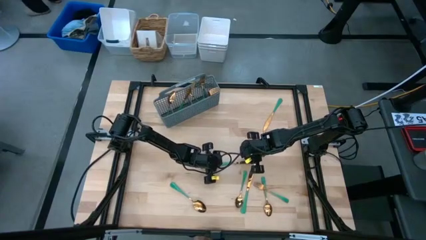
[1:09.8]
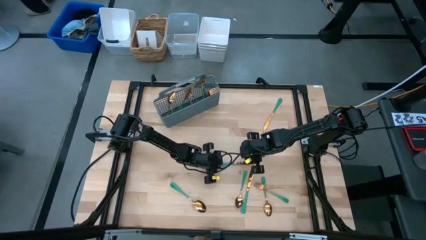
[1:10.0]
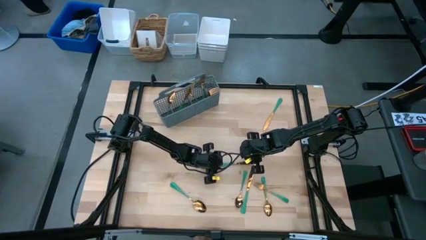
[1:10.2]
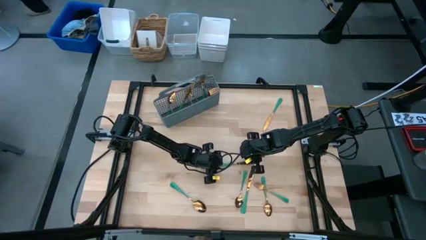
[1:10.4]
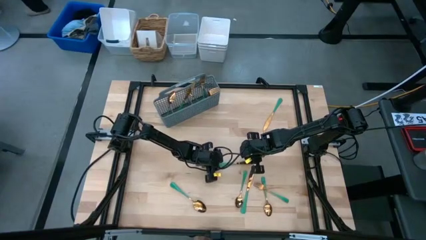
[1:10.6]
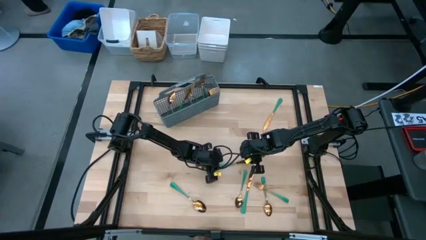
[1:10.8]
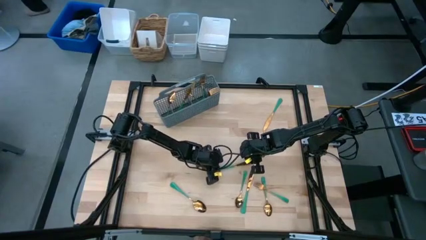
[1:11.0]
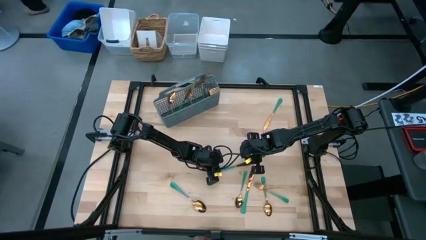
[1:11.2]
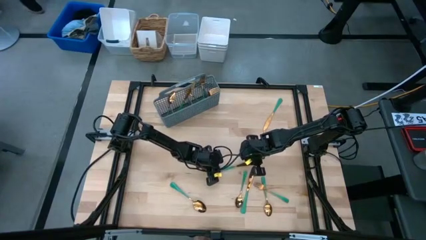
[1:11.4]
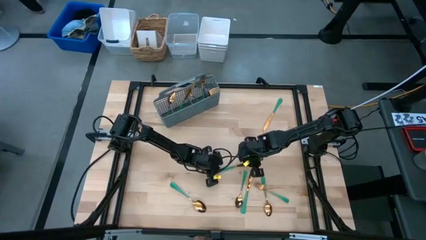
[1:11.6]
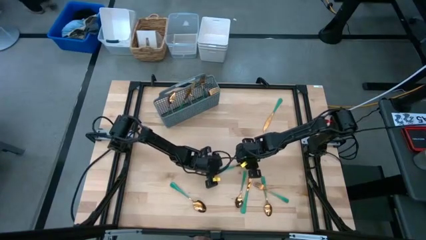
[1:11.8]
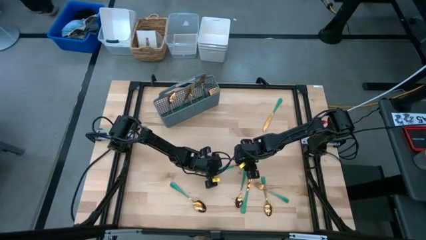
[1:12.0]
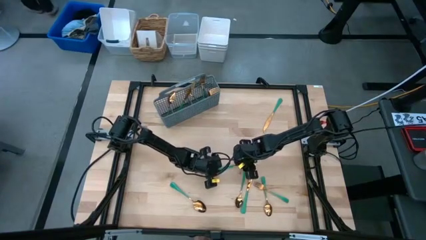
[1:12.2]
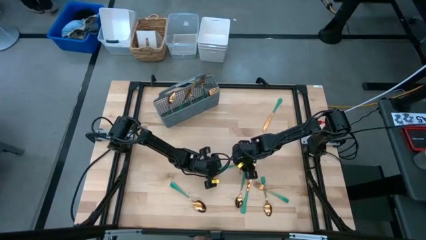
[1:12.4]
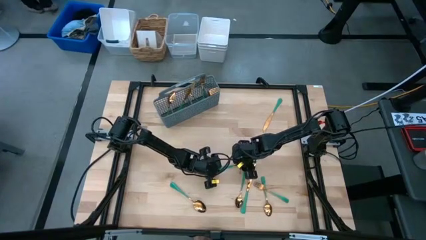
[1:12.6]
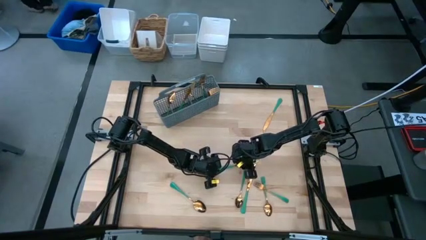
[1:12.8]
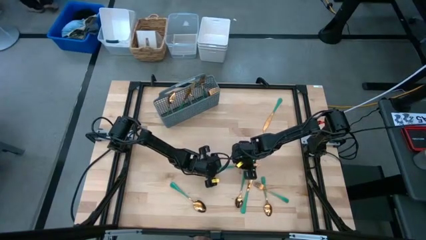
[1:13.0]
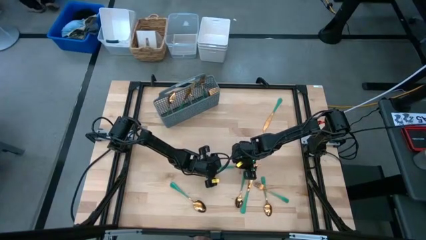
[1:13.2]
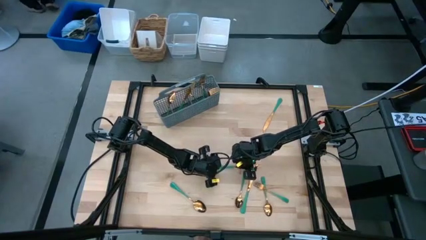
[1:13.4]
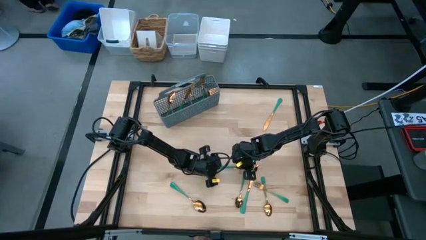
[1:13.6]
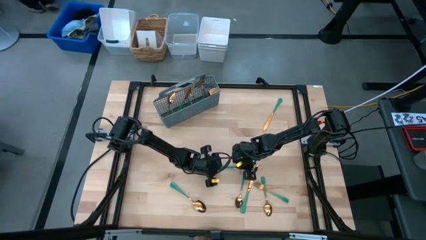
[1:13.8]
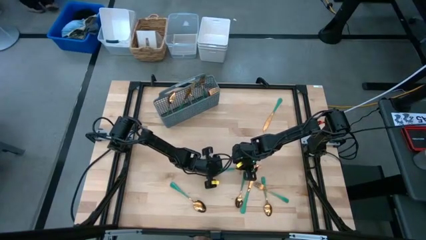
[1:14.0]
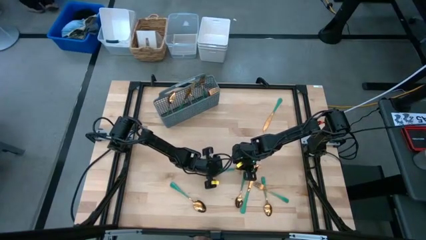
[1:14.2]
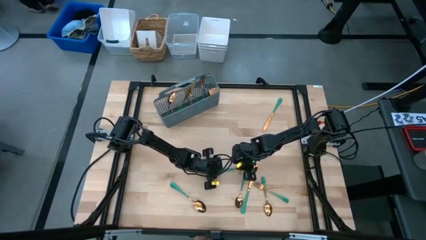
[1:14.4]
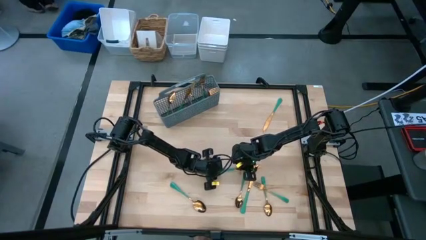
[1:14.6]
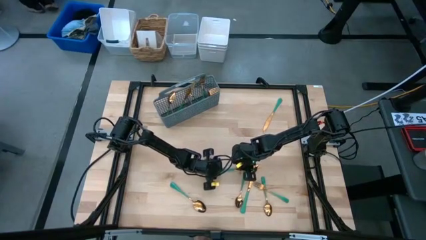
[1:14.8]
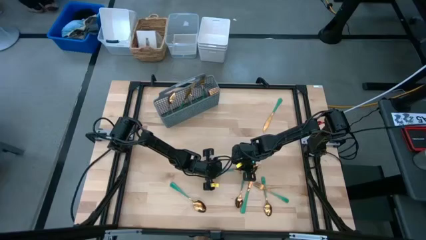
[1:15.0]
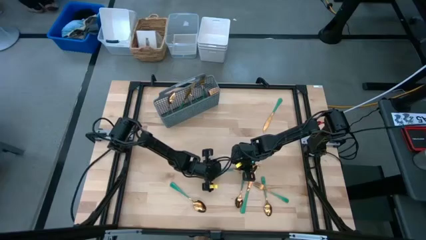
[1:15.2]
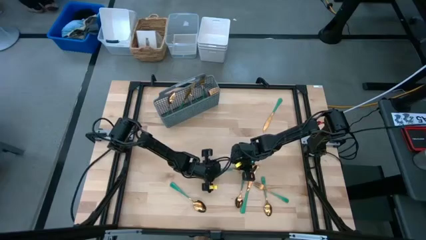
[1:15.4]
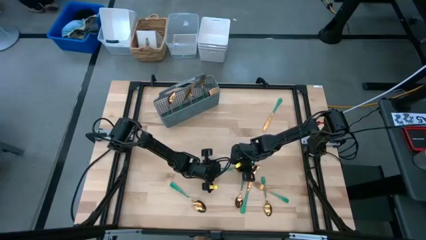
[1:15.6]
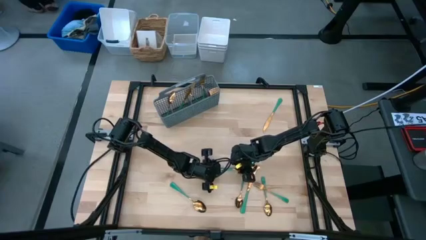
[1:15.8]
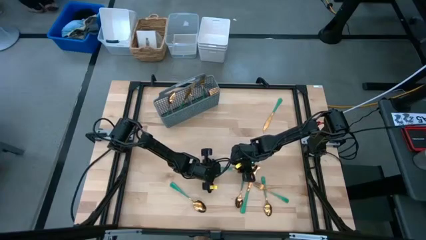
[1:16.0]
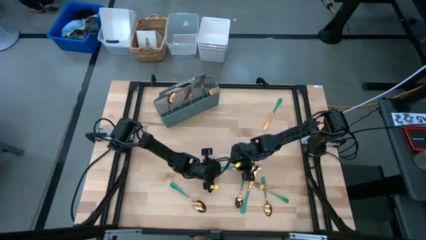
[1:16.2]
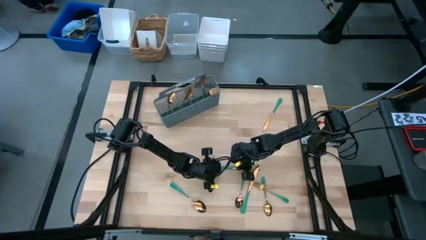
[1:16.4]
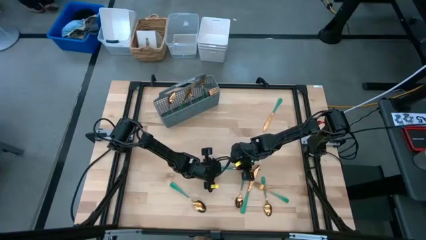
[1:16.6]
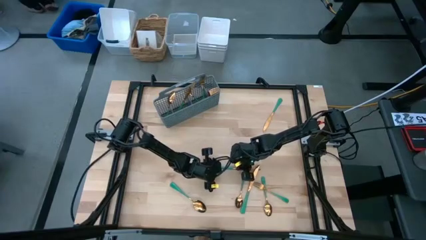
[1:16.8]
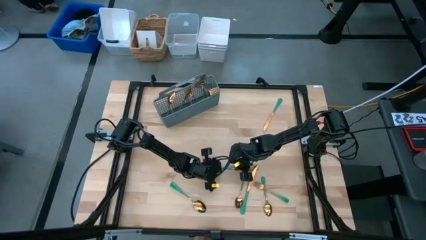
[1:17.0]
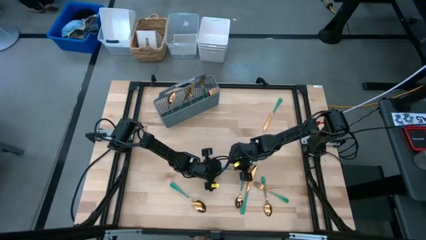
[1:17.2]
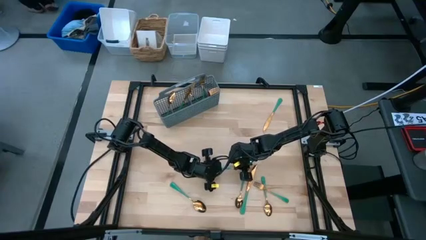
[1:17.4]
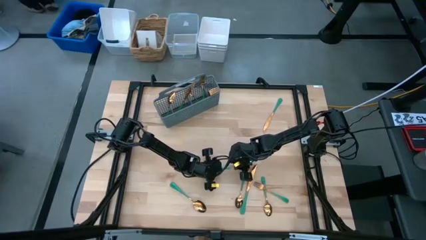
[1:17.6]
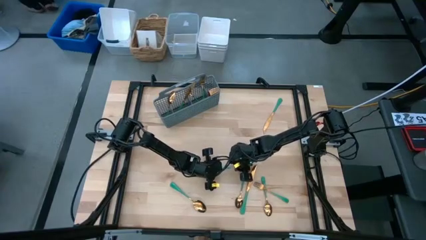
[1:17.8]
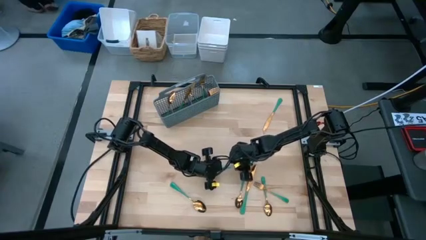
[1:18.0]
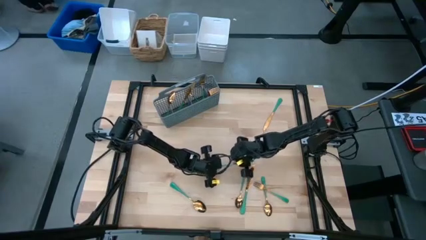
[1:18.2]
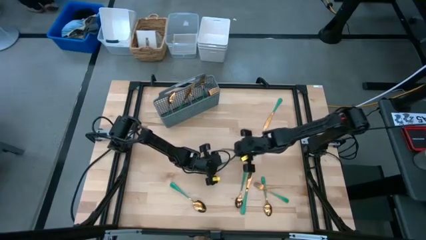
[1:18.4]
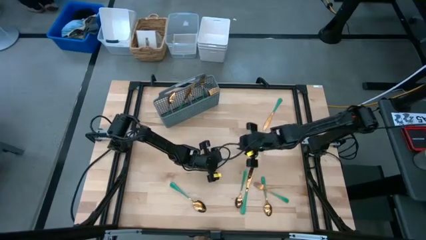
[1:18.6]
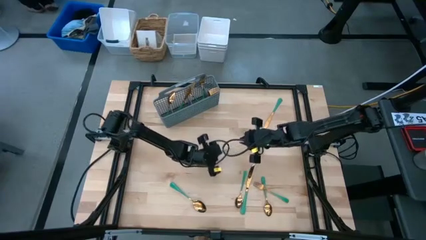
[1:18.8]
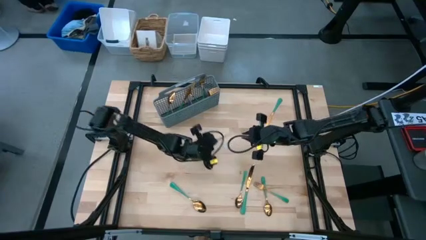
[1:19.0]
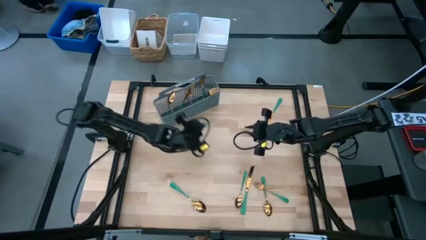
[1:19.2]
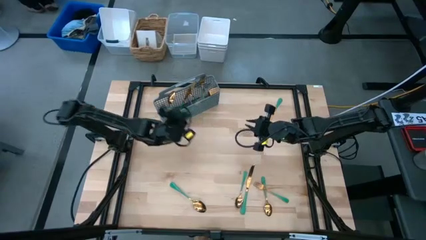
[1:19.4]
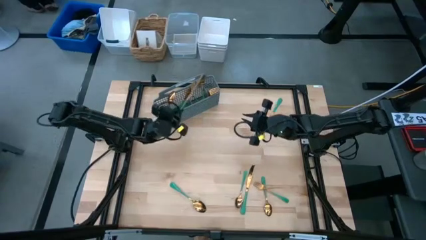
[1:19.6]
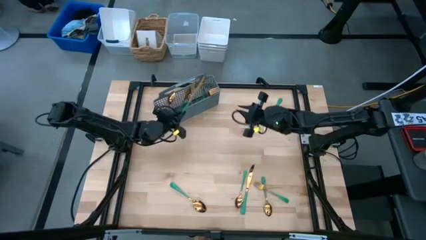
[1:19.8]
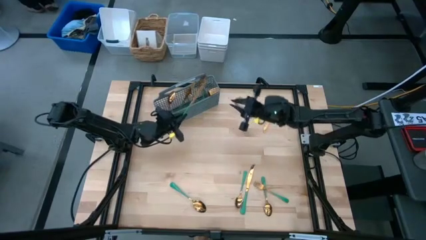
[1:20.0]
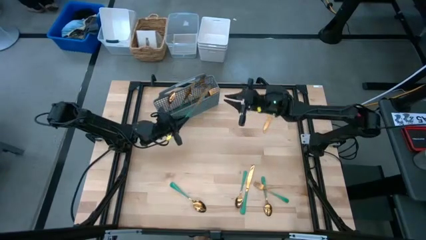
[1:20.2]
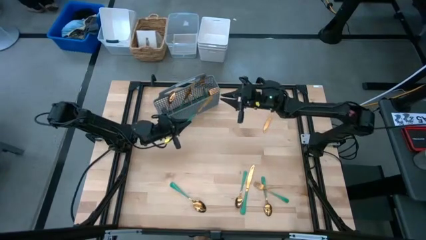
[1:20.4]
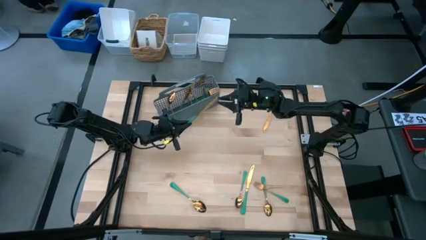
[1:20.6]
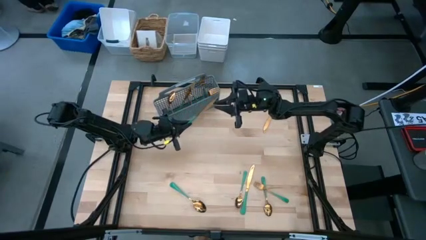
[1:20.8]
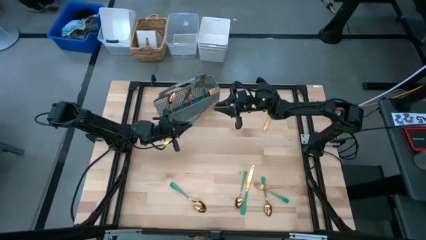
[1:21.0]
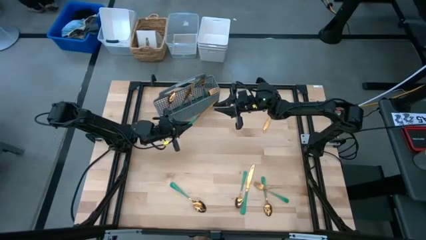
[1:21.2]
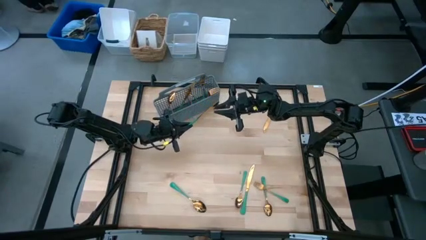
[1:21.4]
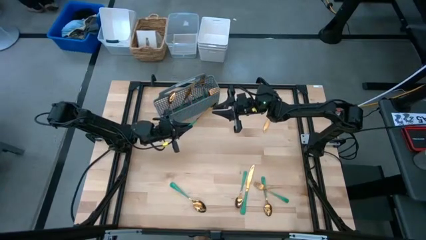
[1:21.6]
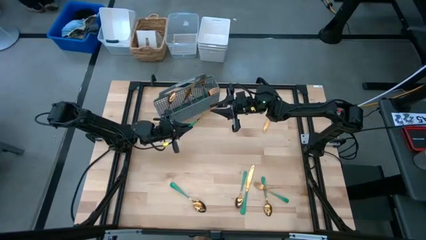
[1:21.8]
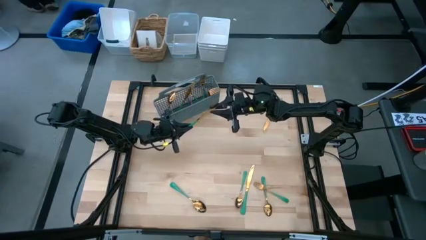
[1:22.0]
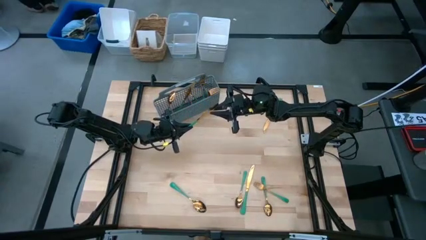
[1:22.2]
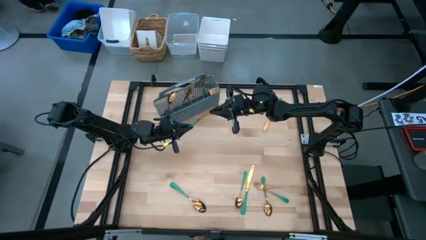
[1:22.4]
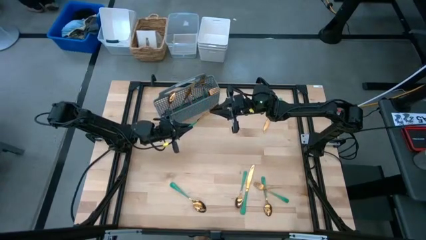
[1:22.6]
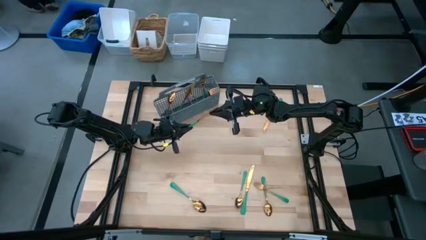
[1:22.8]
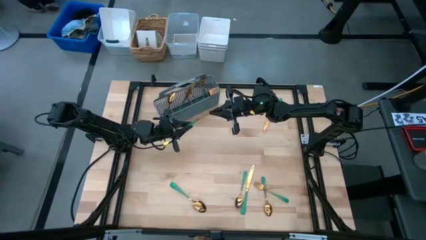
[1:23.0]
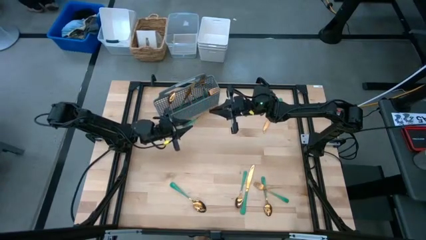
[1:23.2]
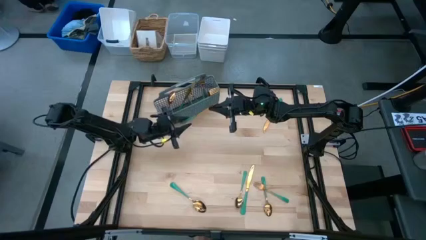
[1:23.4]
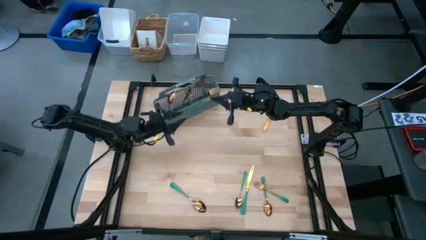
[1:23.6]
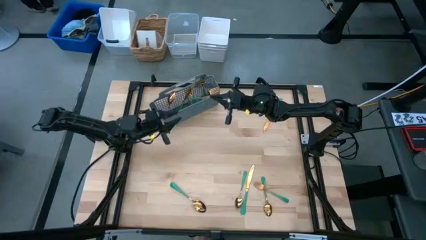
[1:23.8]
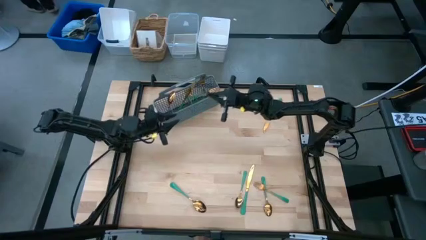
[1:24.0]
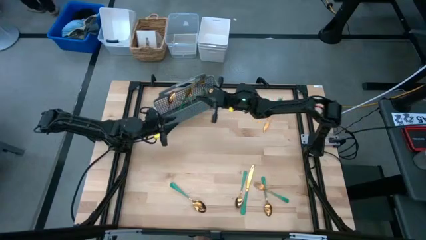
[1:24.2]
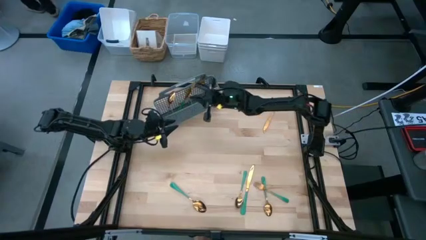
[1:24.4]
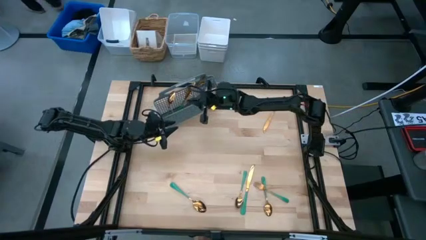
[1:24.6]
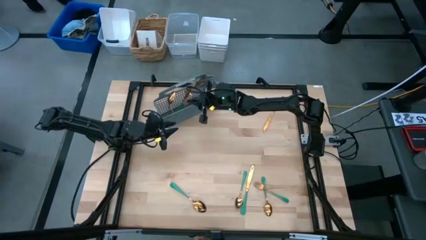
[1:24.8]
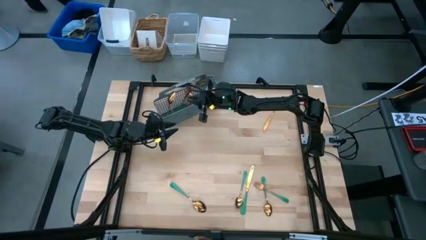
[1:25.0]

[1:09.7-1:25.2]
Task: Sort silverware
Put the knife into the middle left section of the silverware holder

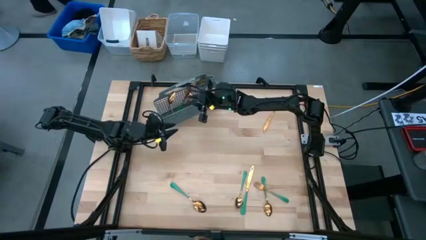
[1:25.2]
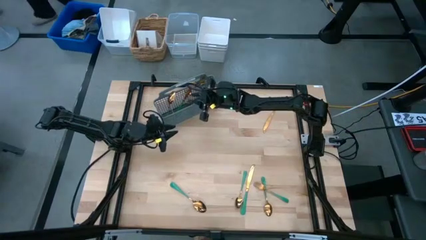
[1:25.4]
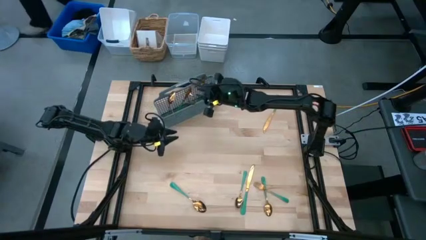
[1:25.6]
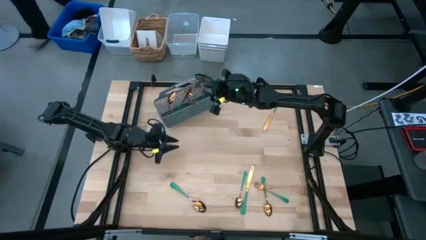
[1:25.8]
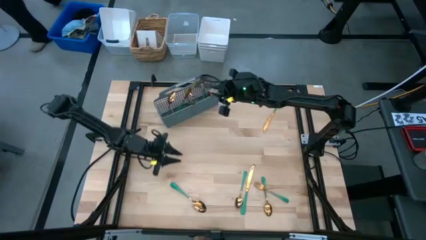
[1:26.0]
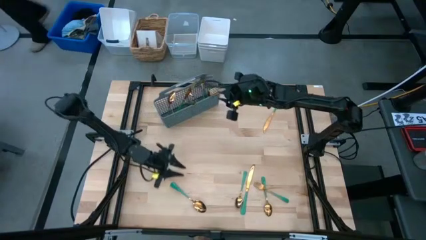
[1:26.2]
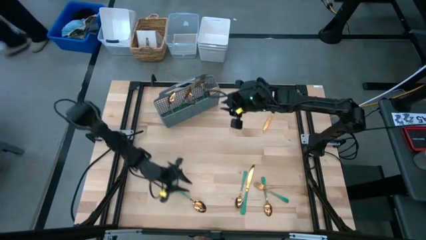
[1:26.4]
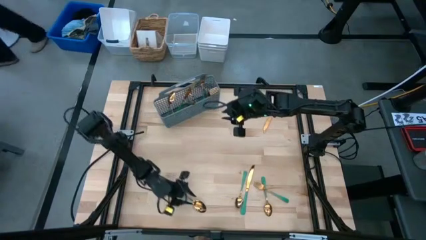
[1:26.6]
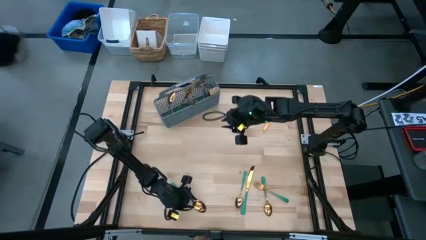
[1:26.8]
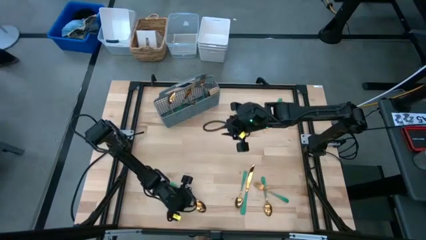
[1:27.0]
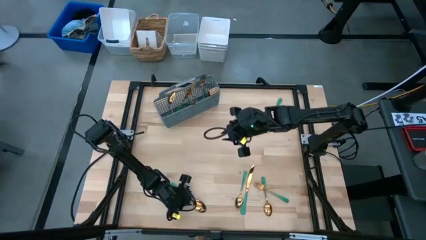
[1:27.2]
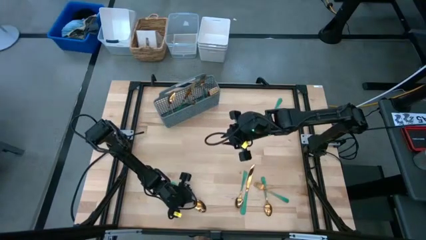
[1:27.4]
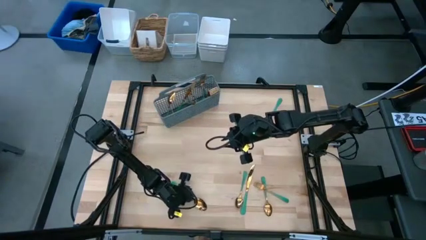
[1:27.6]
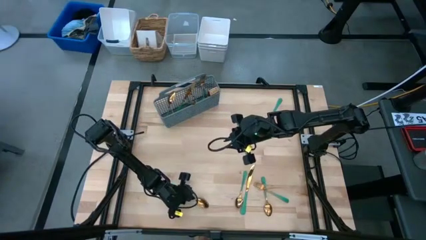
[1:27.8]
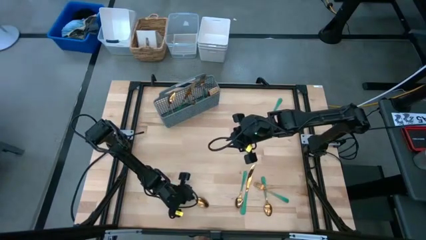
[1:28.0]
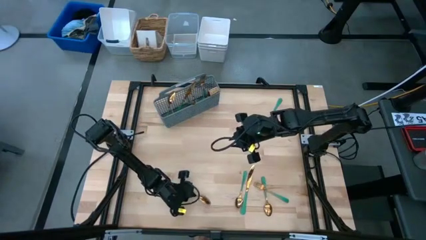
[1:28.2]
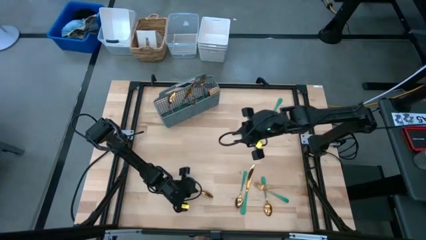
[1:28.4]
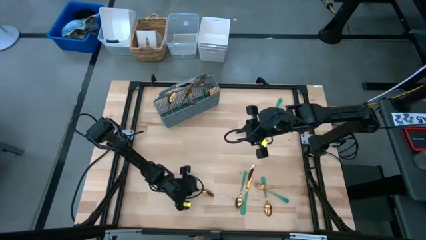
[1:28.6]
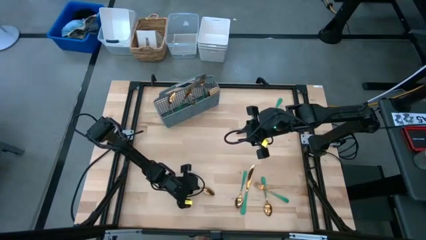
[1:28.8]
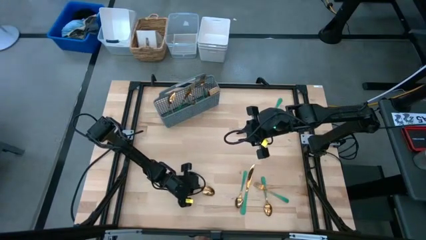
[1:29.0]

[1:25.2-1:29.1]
Put the spoon into the left section of the silverware holder
